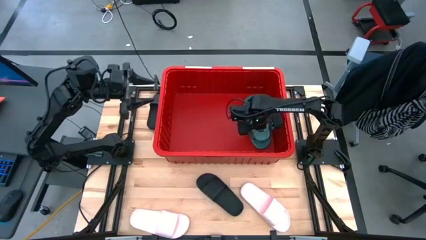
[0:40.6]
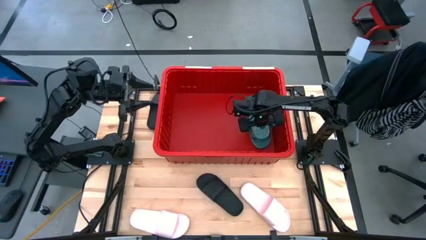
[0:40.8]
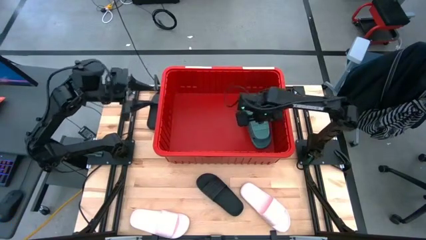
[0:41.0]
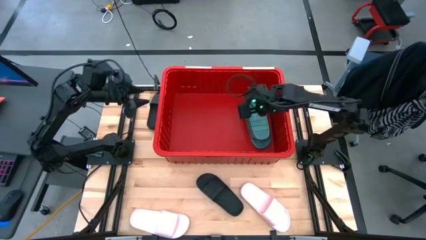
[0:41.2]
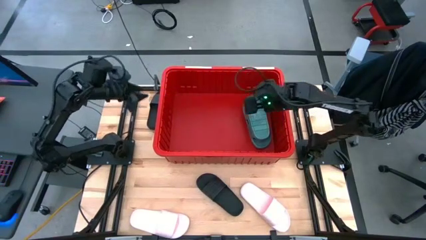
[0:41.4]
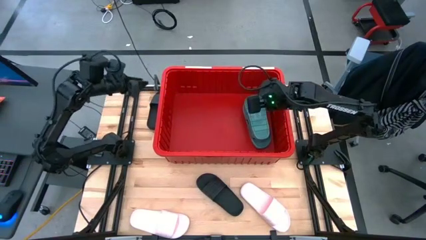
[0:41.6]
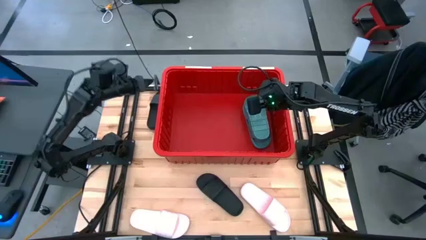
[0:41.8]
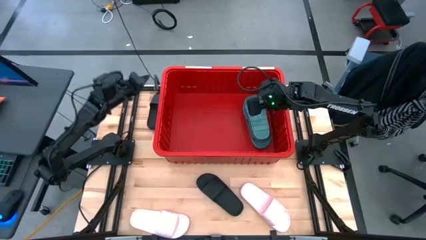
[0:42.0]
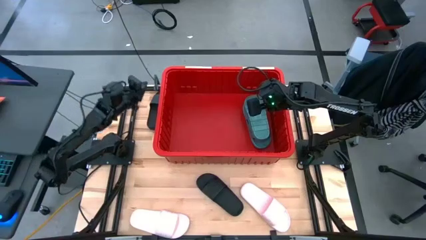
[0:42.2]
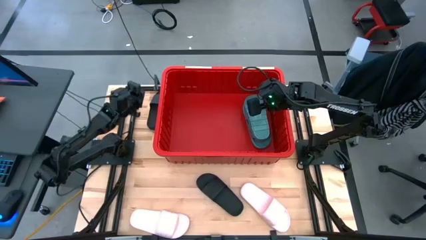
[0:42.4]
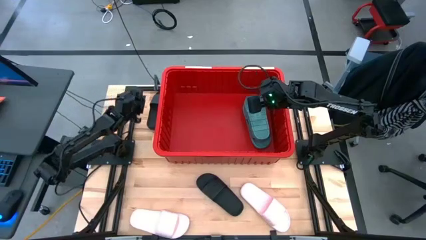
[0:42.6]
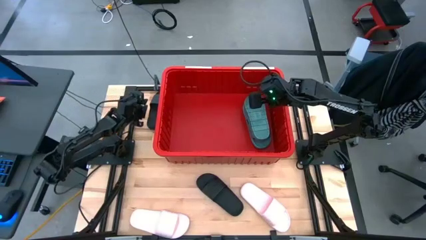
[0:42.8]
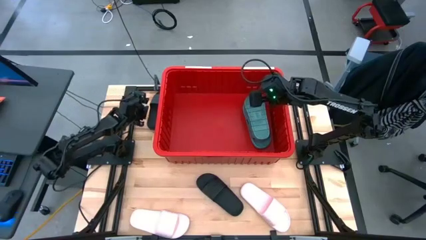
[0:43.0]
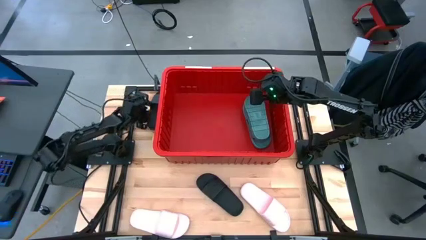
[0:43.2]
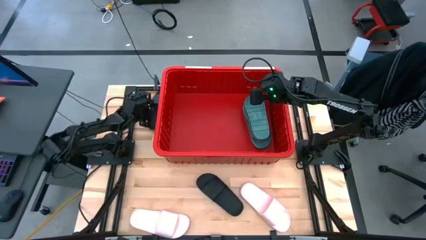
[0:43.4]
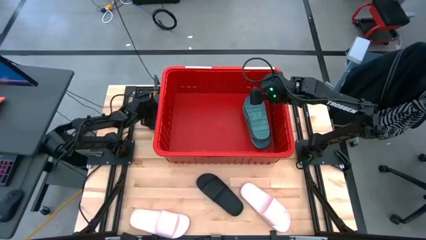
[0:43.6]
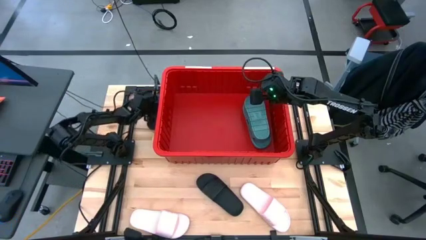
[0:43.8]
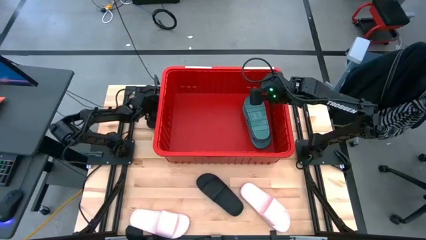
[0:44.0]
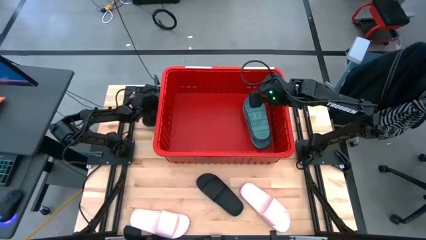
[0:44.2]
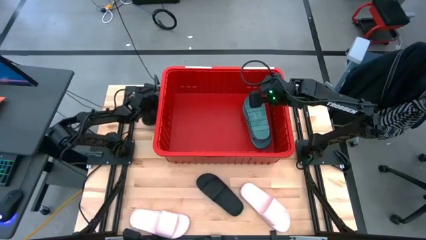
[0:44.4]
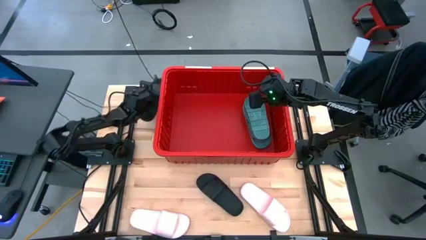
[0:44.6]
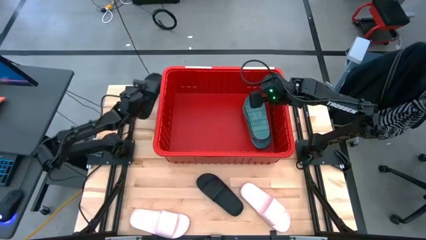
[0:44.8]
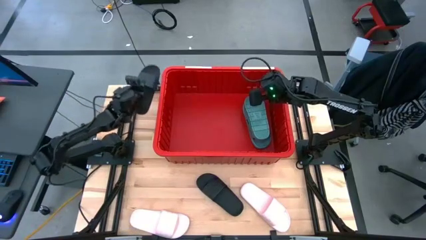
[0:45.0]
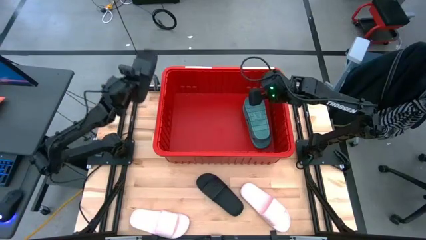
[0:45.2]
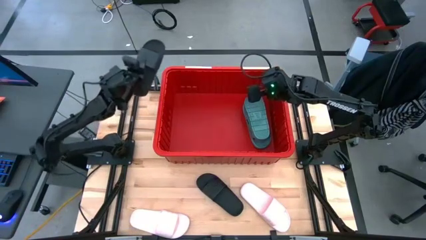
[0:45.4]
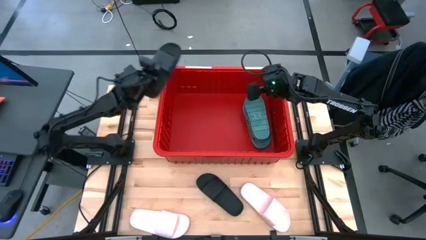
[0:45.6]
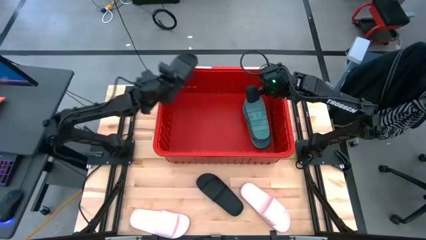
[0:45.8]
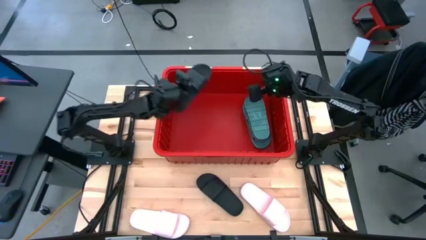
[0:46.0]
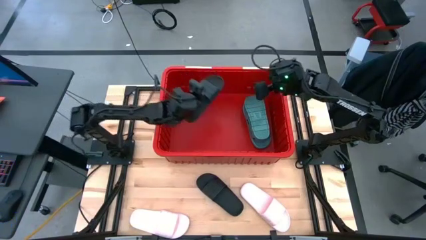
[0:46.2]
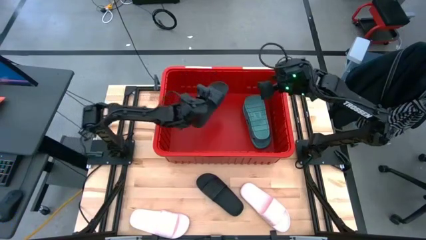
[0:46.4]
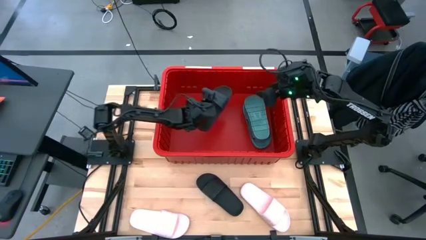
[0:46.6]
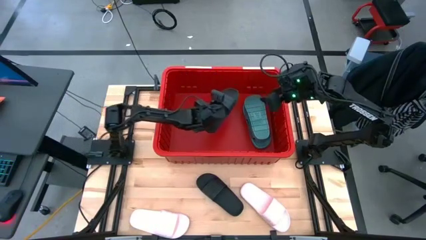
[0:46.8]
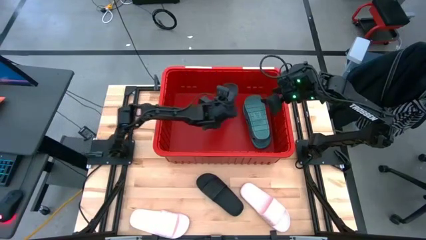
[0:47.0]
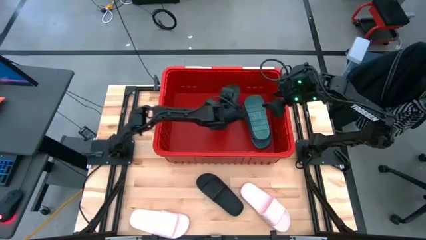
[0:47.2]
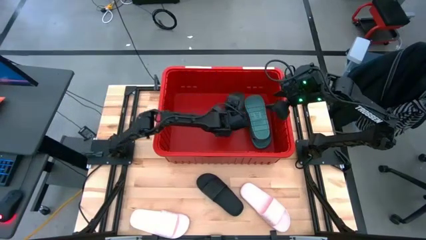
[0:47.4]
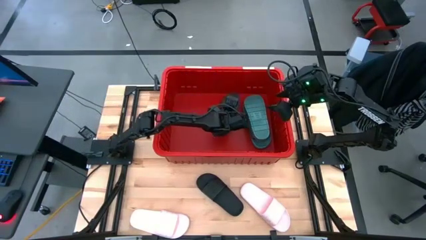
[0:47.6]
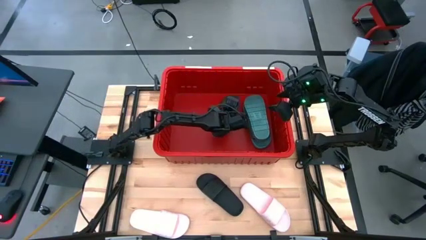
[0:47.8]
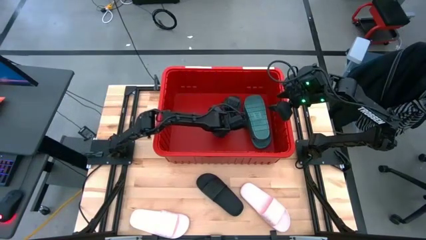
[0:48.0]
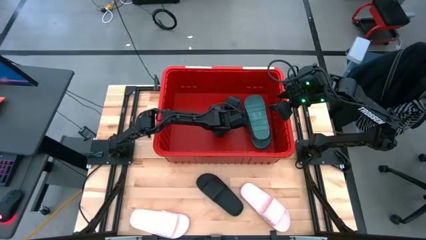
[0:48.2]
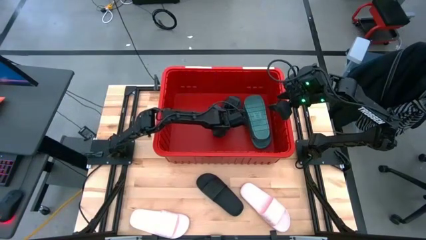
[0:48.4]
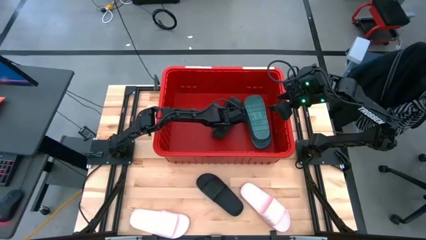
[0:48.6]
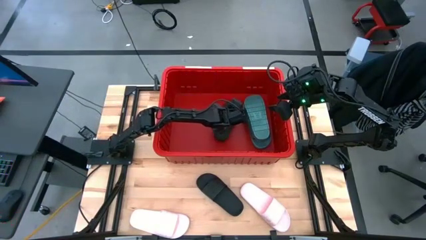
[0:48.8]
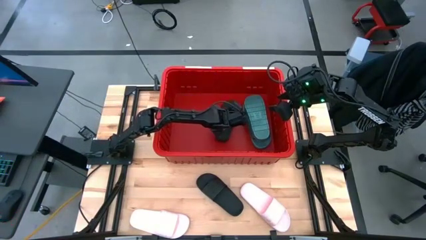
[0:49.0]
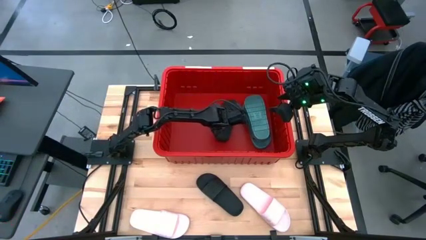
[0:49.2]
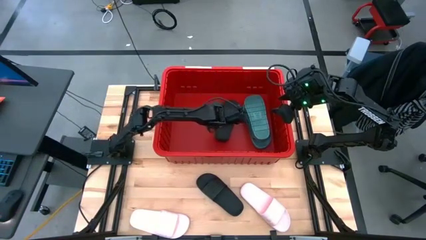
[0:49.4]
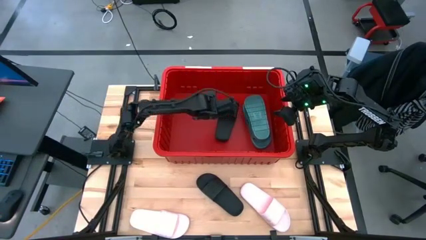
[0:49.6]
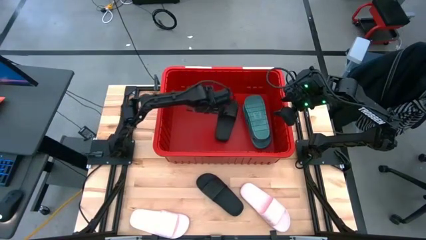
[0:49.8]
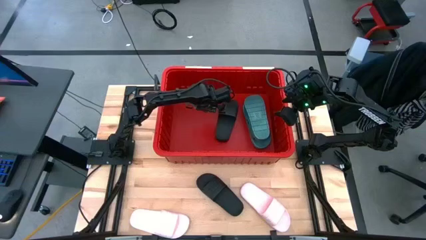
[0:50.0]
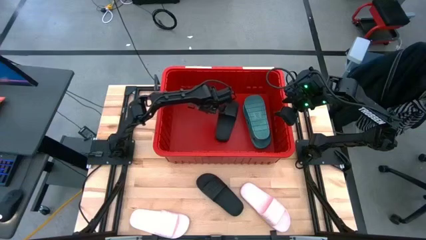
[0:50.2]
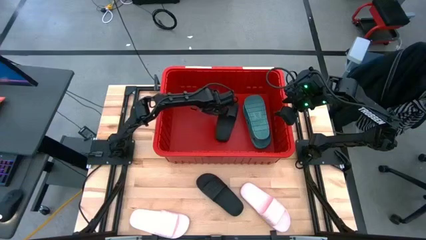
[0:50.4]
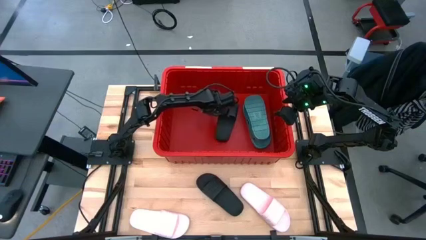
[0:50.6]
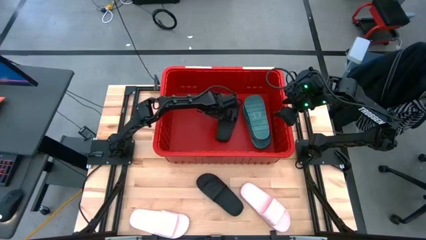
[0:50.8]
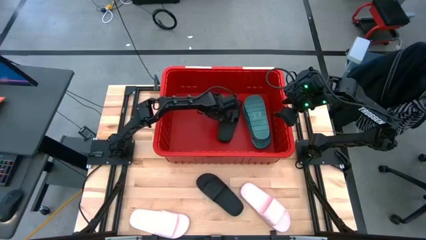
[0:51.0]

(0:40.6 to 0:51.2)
Task: Pick and place slides into bin
Put the top black slides into the red bin
